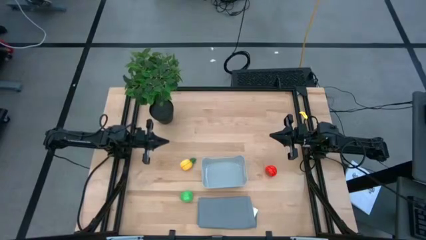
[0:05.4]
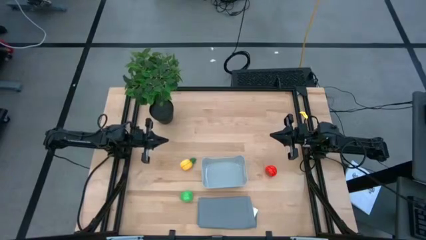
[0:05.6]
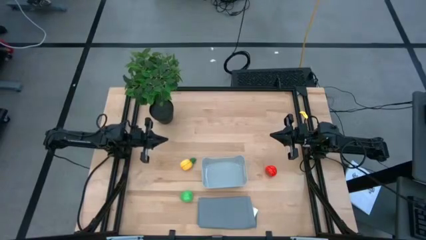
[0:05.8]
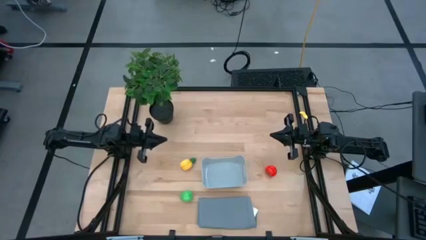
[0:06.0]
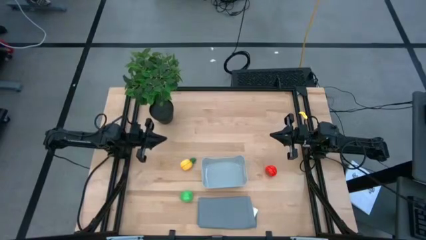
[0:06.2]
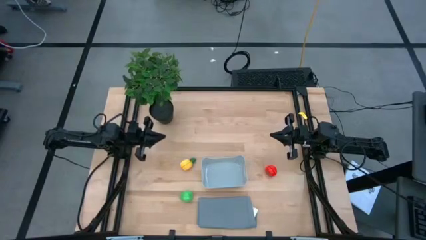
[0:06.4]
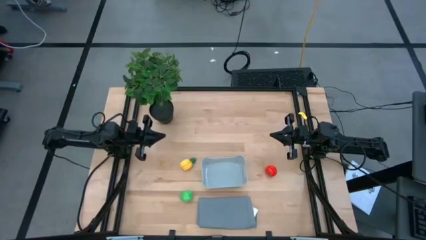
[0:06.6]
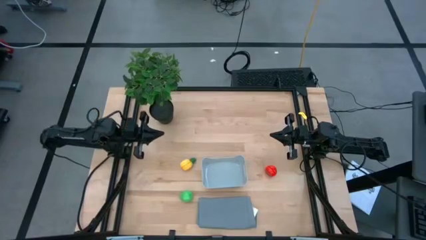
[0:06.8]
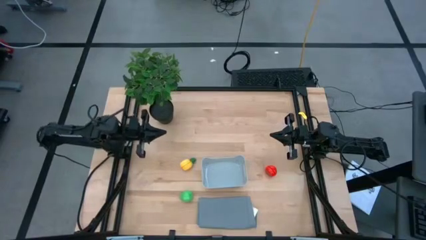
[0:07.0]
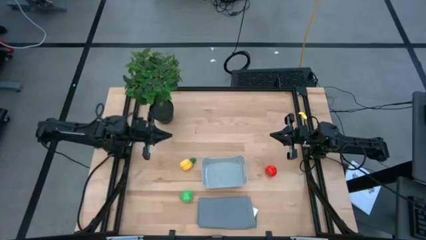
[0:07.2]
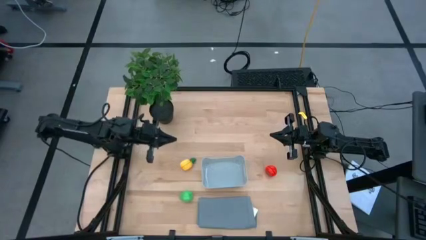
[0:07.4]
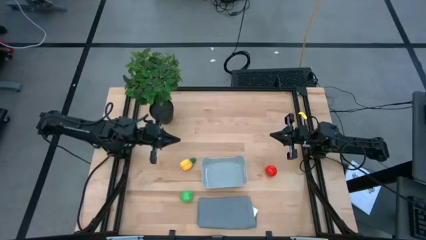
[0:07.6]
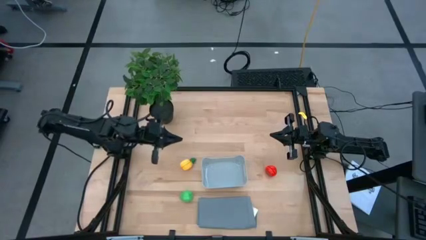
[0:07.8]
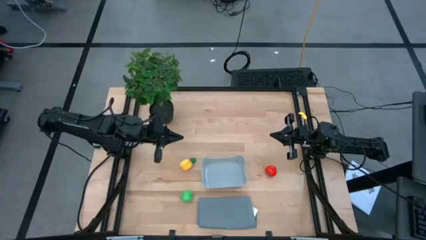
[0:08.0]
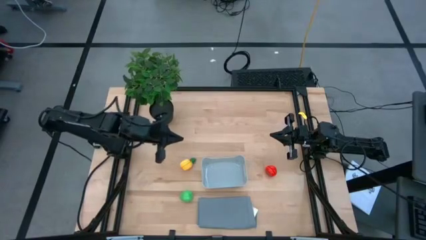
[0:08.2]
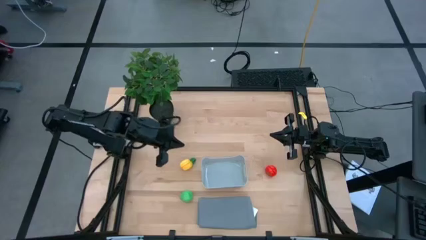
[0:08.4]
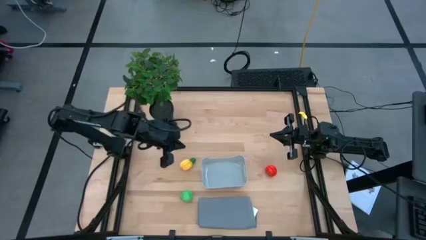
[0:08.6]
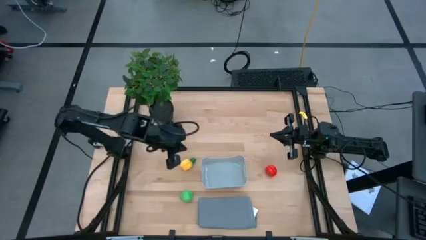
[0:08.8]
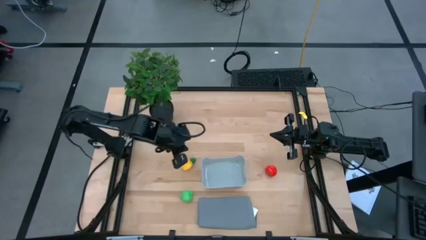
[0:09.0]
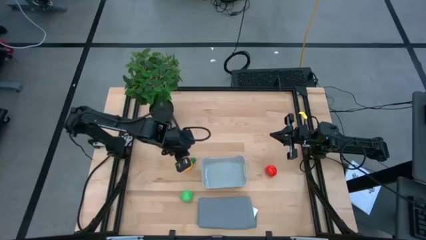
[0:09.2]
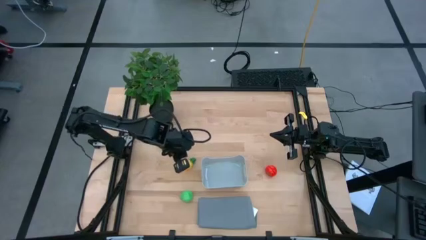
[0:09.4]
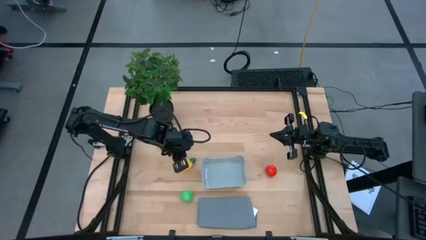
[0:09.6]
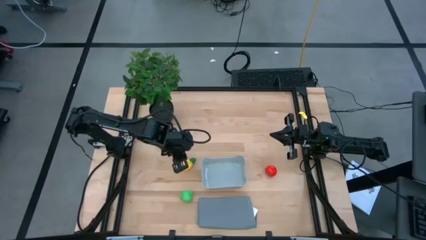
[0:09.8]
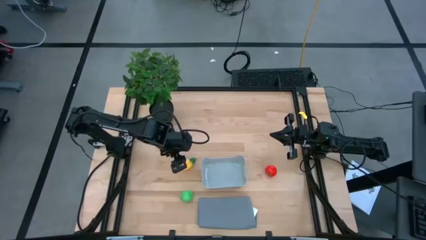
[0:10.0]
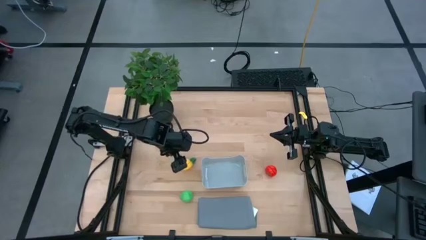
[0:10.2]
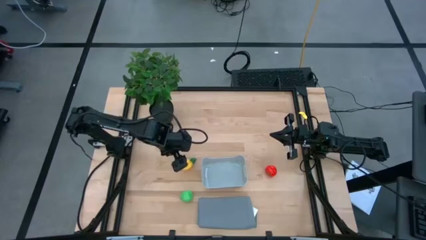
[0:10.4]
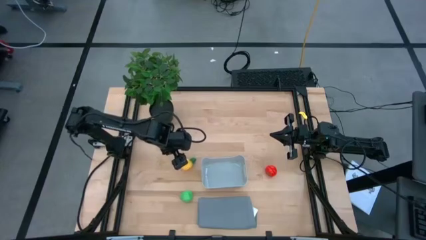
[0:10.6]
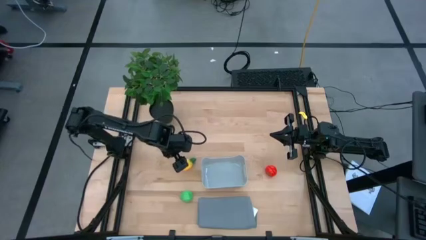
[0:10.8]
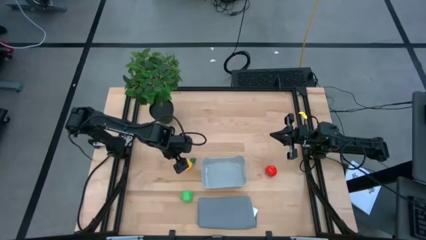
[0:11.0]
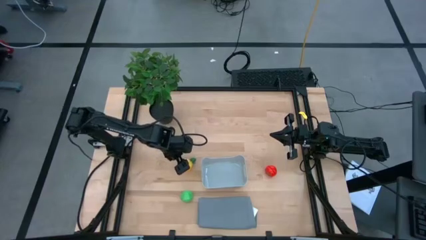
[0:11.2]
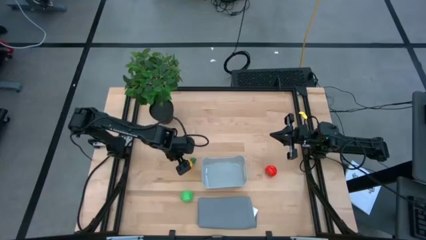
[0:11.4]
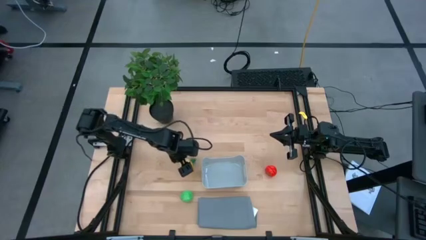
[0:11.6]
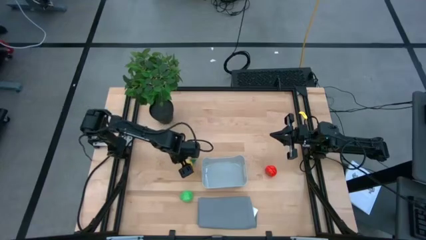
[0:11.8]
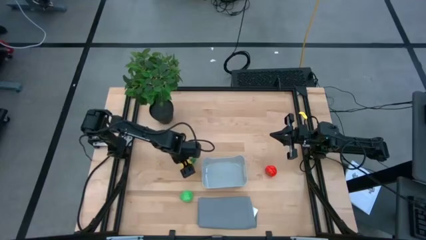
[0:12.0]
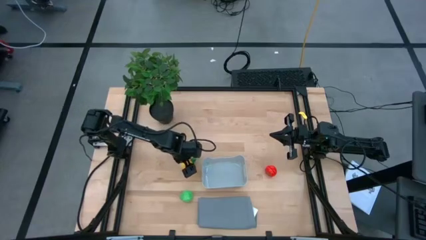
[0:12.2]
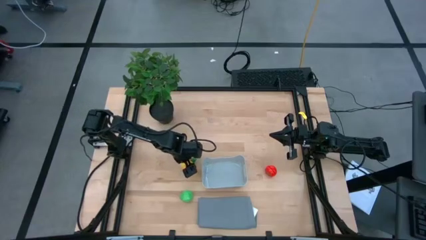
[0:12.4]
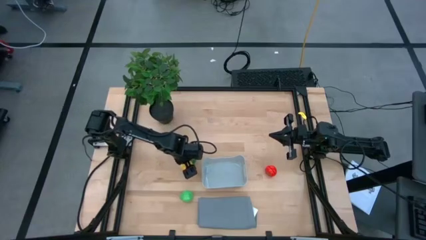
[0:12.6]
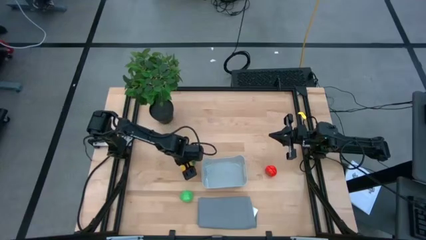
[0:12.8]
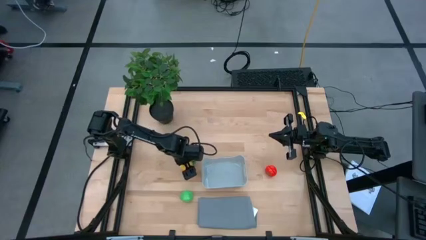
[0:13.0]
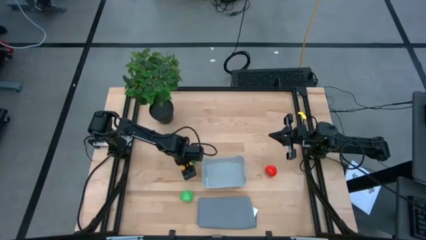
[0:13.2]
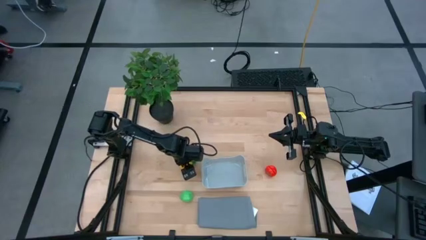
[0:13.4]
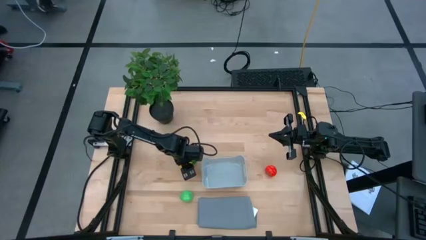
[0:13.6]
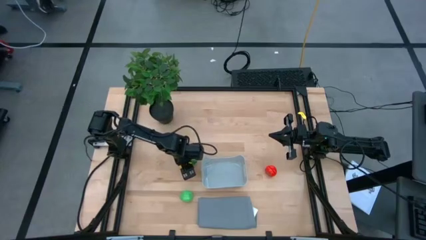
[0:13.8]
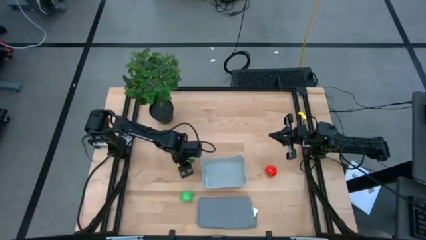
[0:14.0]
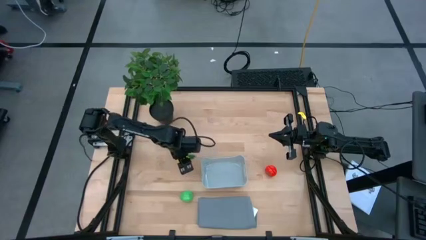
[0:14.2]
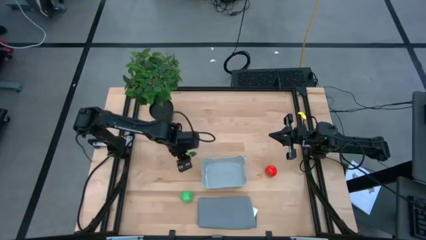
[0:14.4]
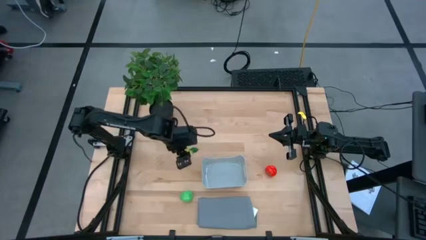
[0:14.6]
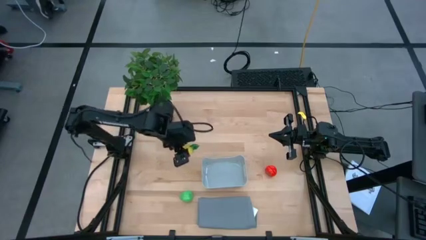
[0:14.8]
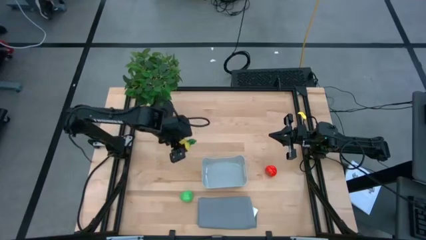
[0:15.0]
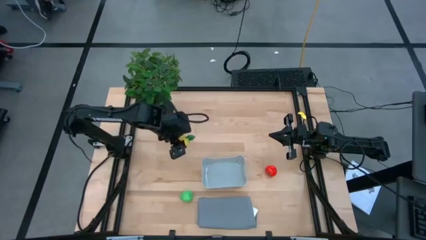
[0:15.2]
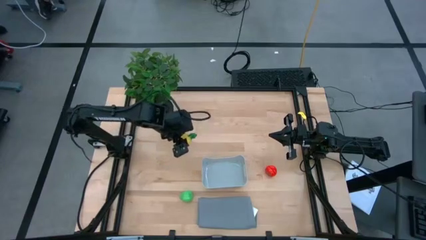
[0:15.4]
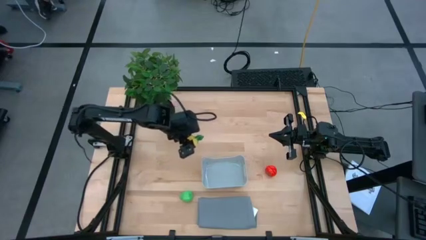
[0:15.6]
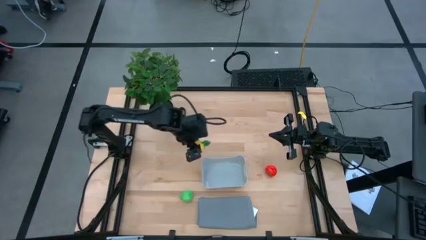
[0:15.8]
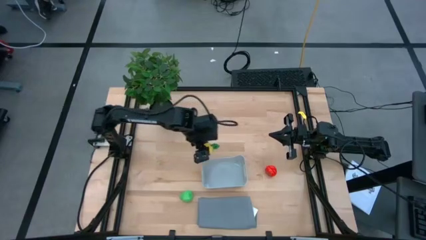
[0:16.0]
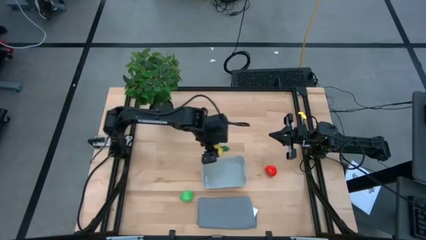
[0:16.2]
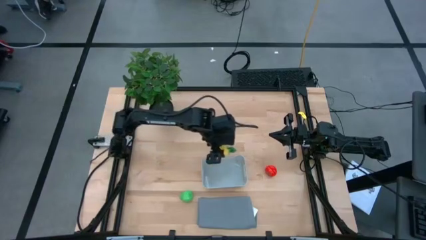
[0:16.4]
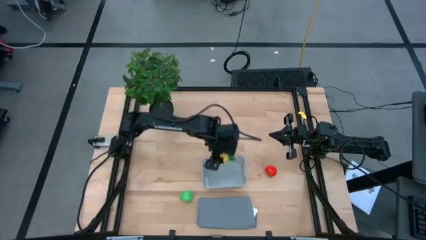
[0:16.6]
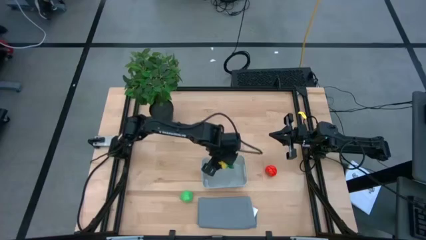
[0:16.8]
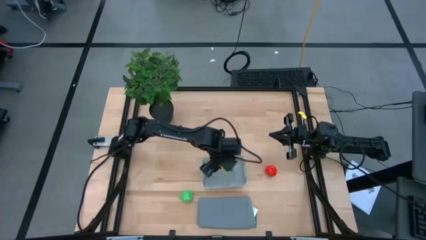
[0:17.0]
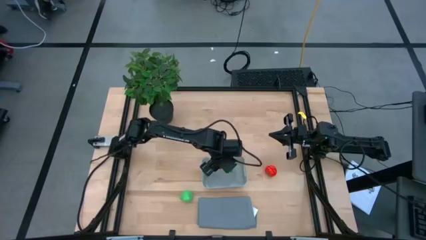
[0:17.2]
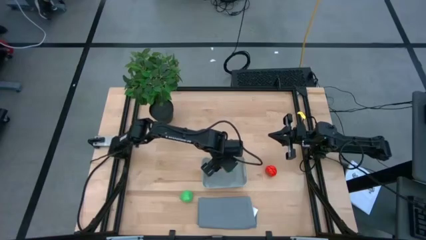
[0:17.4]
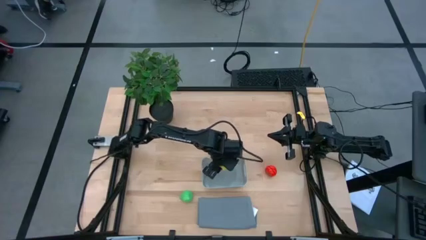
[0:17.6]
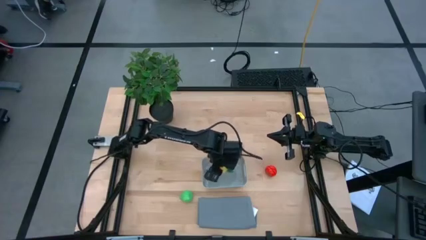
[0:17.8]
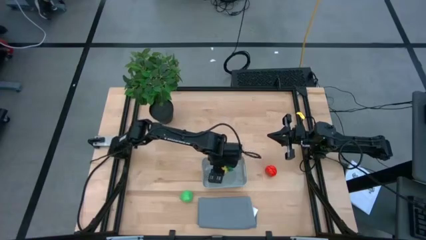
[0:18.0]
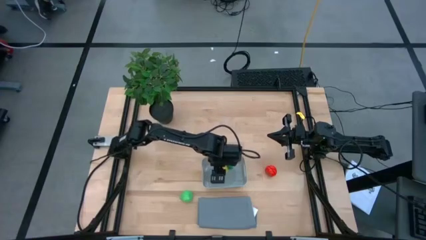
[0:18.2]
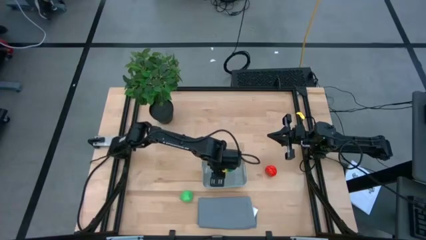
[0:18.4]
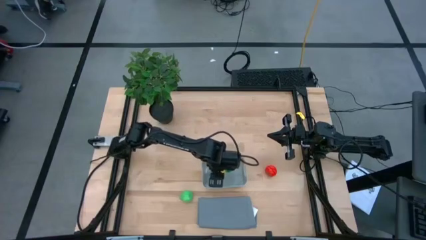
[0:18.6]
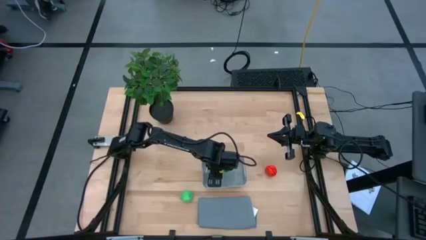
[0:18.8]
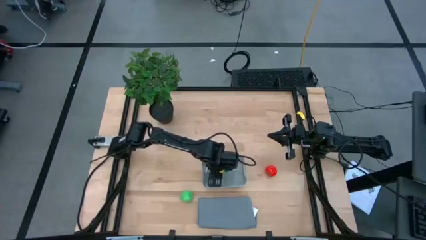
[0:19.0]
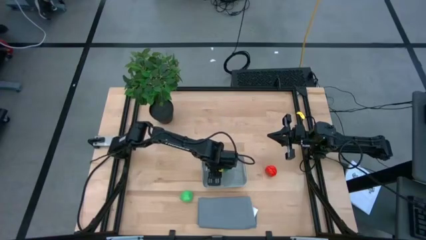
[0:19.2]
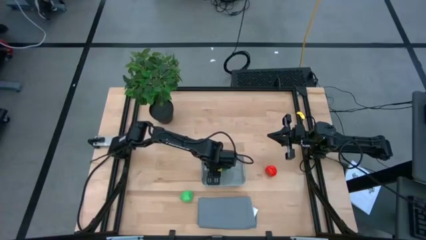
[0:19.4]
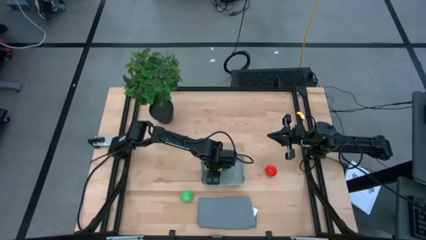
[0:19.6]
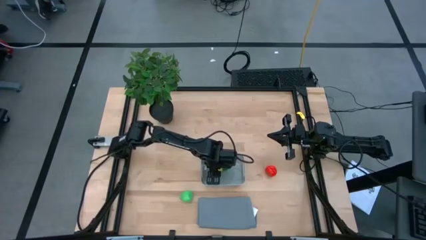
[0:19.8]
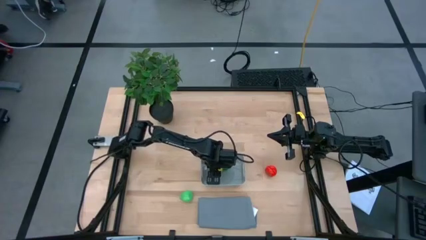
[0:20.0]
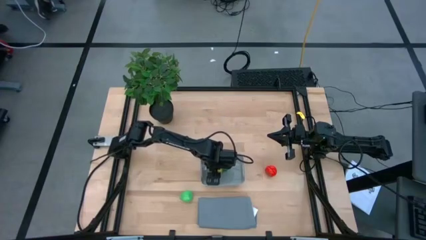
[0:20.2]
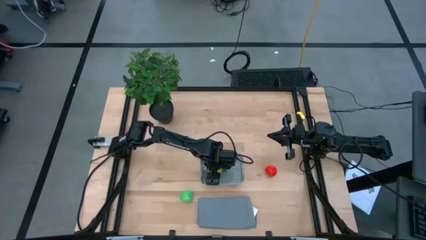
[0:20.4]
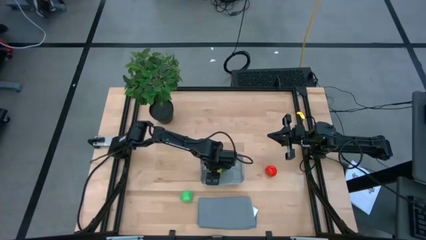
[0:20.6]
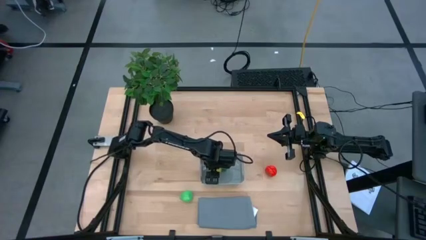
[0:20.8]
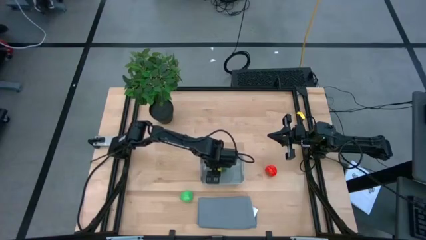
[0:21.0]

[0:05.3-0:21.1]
Task: Pick and placing Produce into tupperware
Put the yellow pineapple into the gray bin
